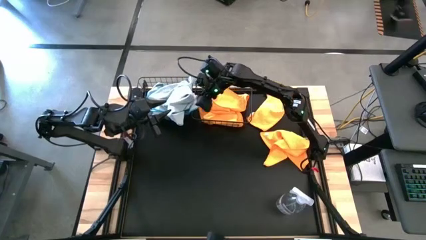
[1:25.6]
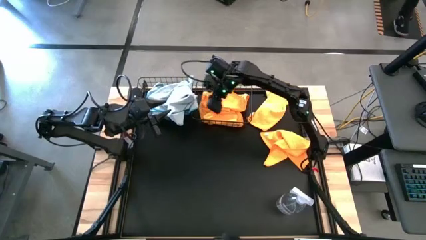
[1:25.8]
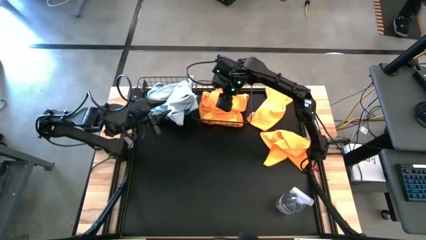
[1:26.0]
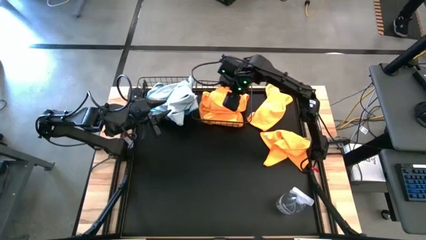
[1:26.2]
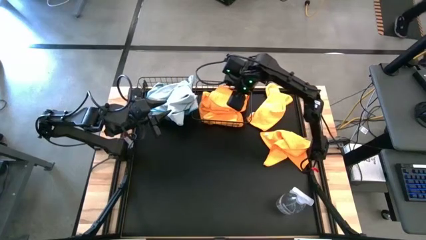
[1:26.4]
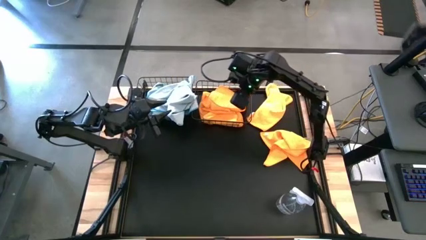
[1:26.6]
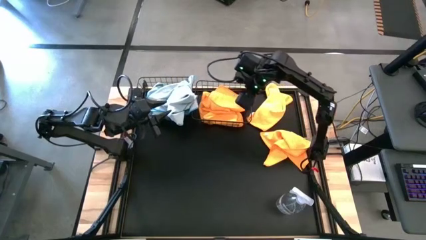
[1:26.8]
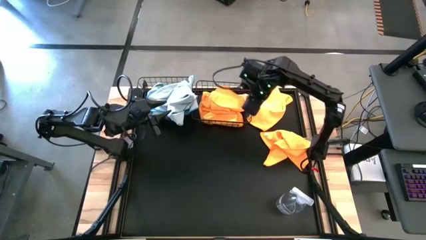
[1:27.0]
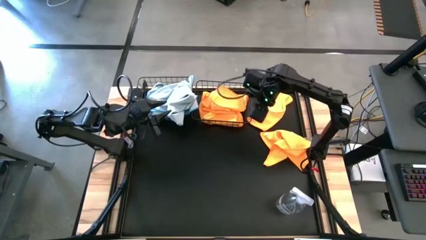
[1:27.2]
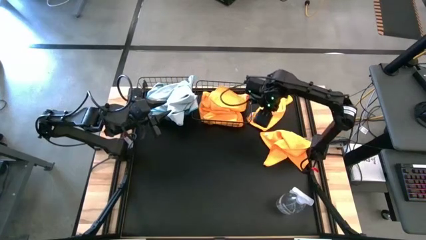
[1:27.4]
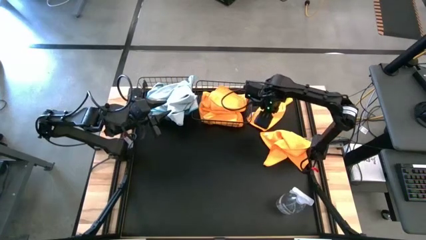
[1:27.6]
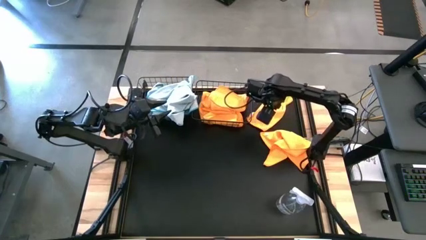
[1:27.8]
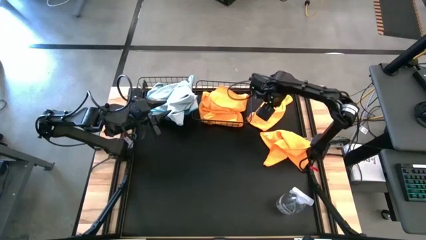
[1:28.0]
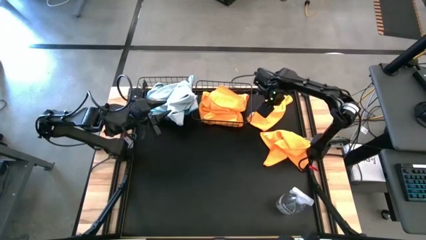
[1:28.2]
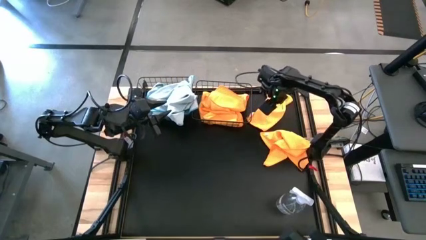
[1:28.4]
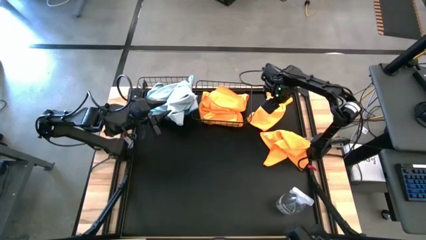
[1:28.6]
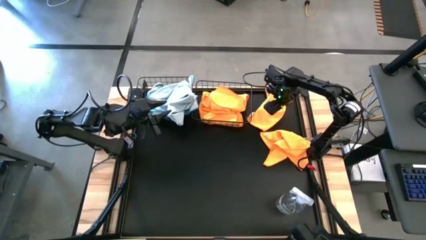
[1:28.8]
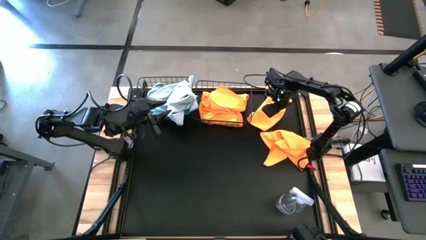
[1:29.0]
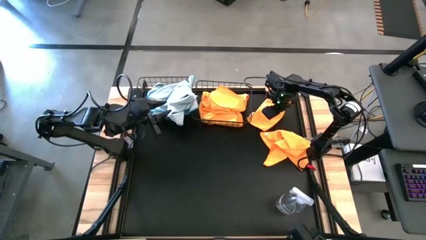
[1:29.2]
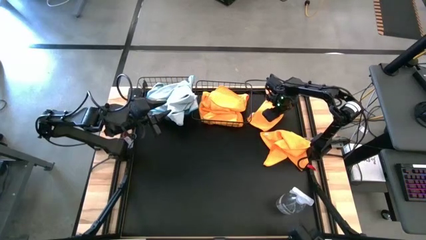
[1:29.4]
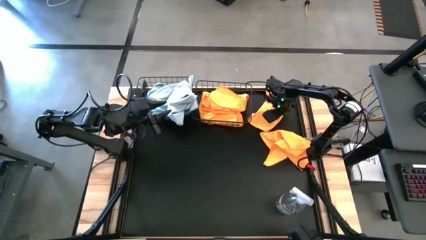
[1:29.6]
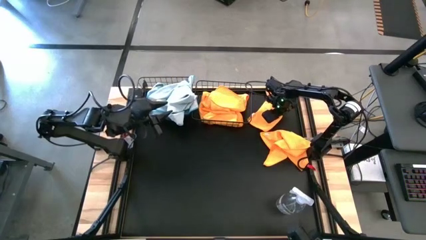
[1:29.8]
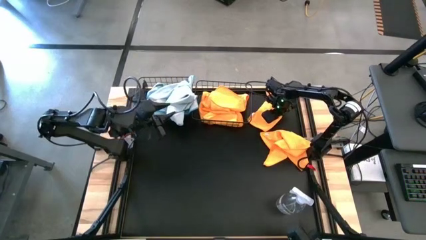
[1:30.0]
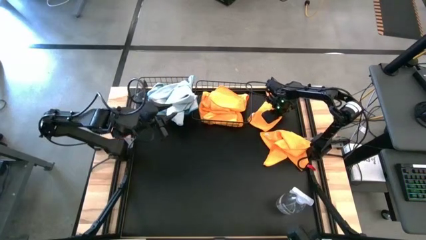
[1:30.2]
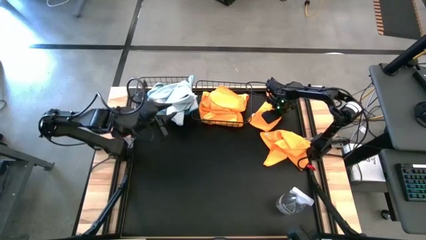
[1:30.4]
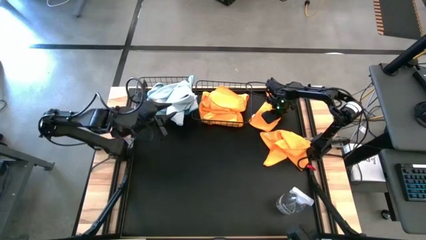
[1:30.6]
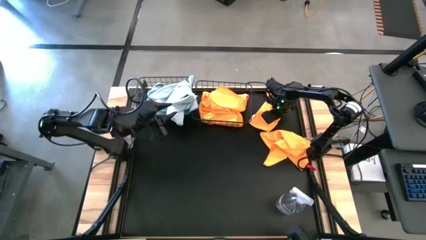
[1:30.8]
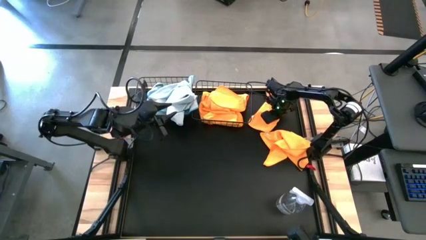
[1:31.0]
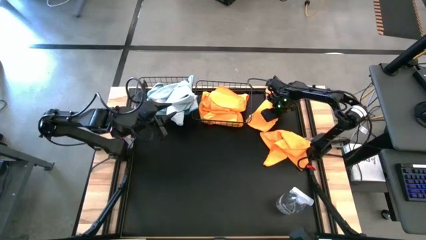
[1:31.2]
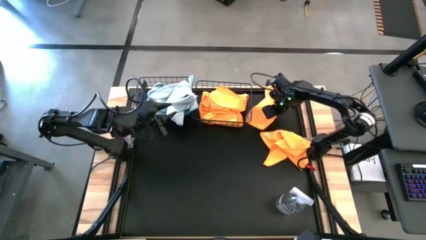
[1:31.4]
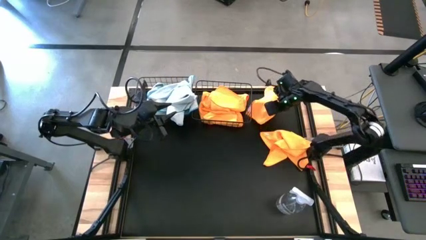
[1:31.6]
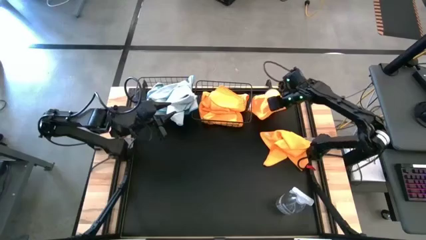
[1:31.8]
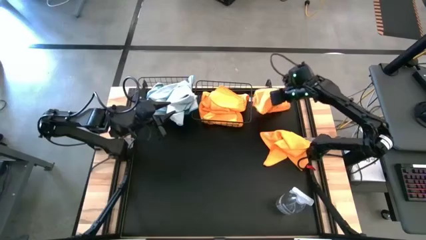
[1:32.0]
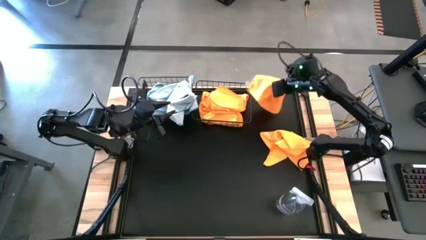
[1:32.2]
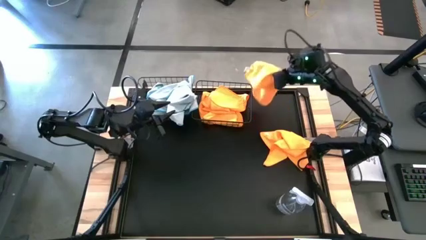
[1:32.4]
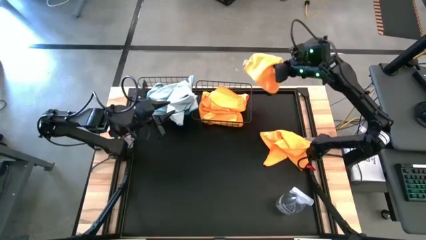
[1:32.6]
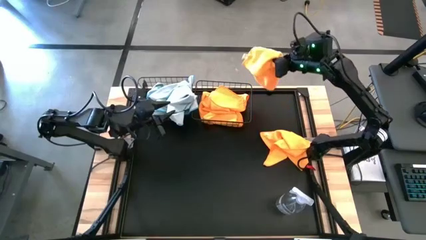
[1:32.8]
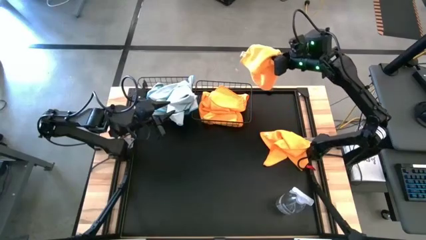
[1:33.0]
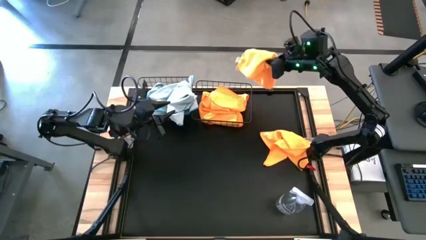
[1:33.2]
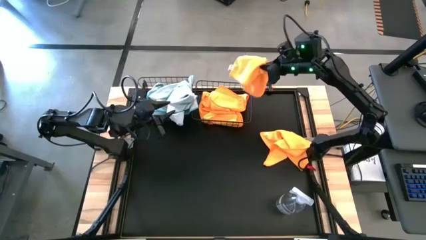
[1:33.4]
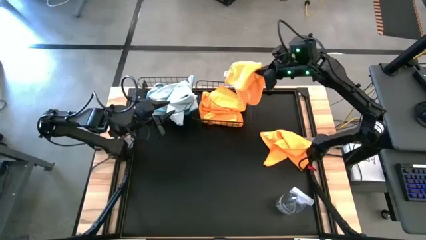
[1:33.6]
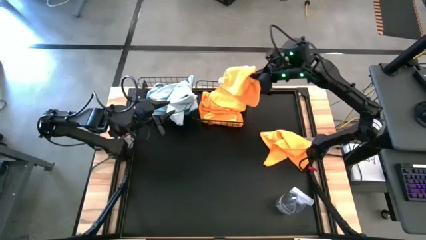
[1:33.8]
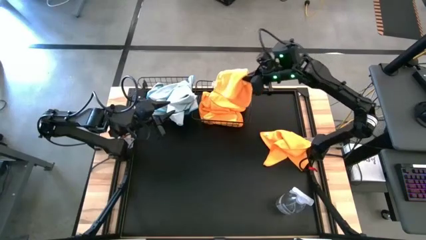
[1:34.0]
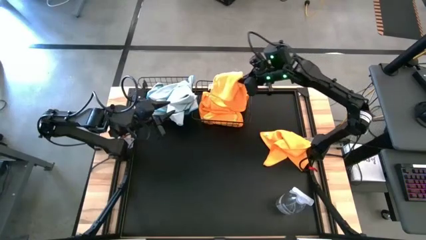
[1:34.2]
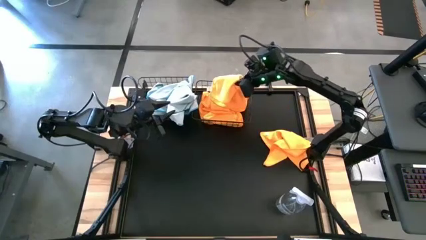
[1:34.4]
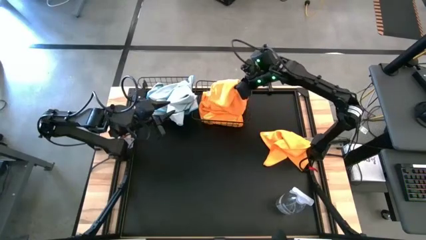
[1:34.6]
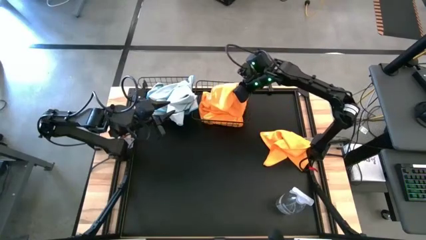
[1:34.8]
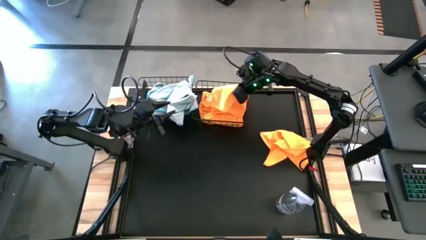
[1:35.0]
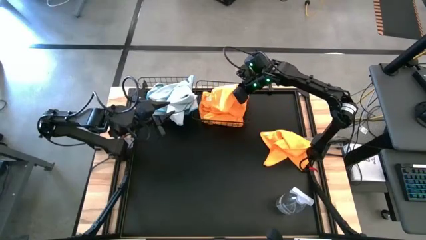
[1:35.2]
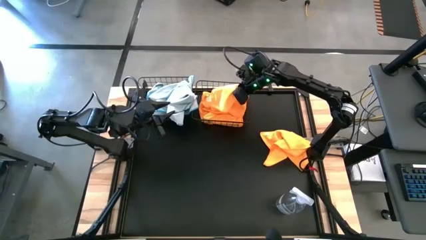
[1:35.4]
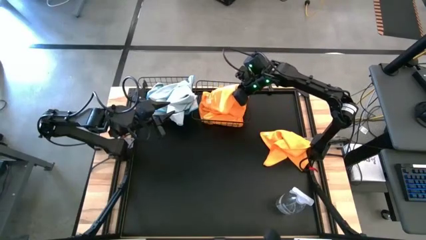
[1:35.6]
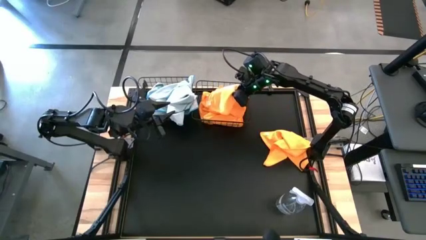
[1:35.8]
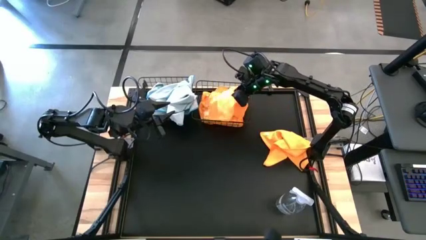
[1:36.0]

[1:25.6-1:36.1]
Task: Sort microfiber towel by color & place in baskets
Put the yellow towel into the right black wire basket

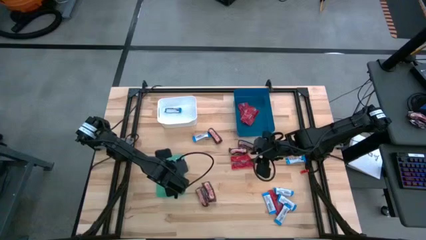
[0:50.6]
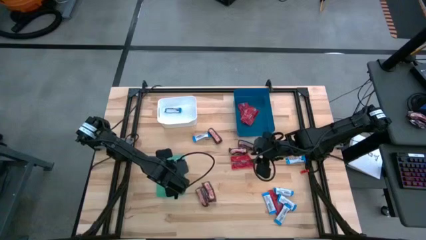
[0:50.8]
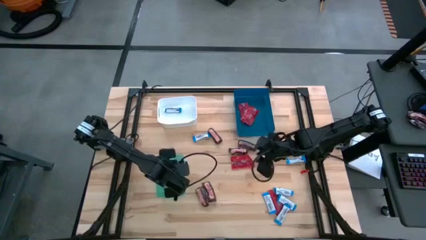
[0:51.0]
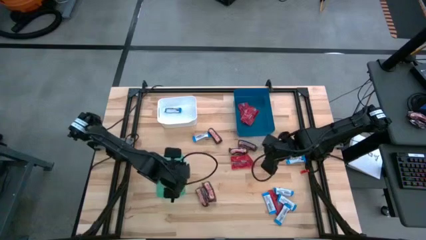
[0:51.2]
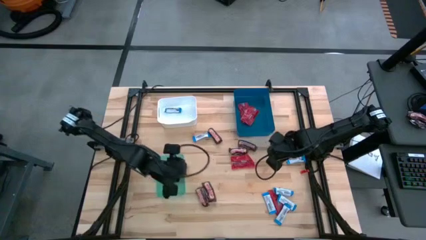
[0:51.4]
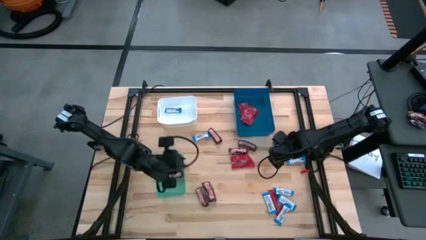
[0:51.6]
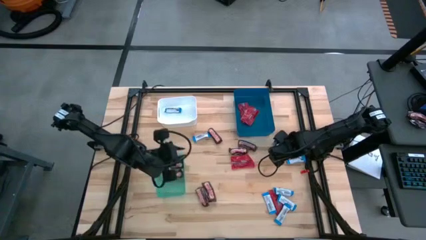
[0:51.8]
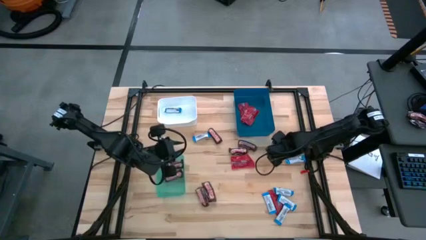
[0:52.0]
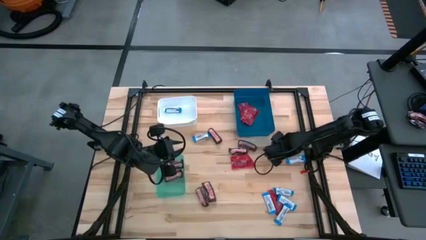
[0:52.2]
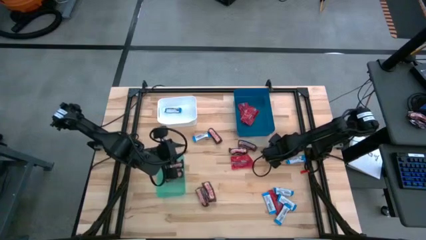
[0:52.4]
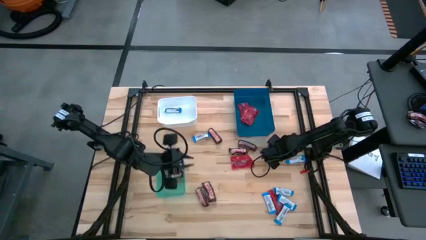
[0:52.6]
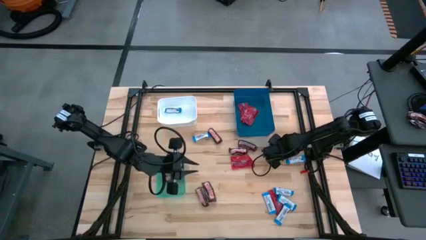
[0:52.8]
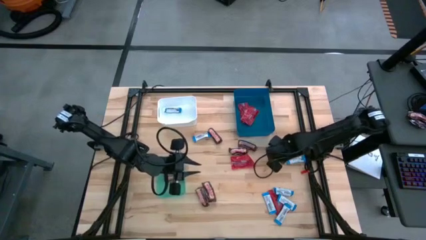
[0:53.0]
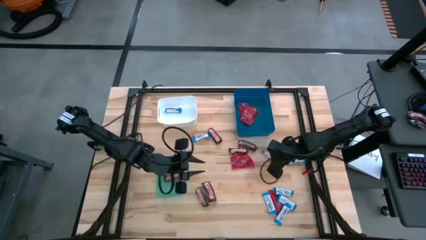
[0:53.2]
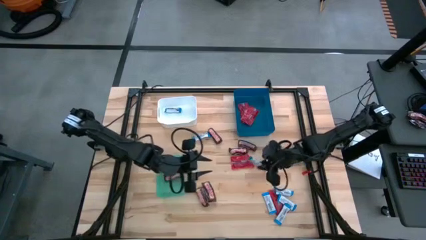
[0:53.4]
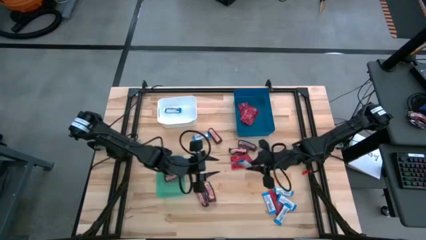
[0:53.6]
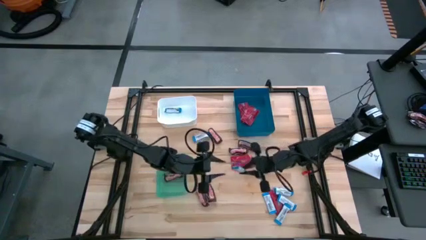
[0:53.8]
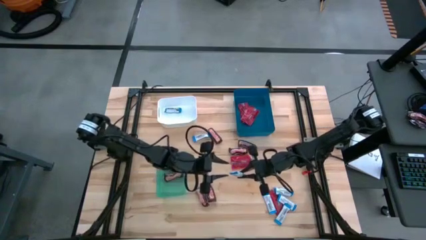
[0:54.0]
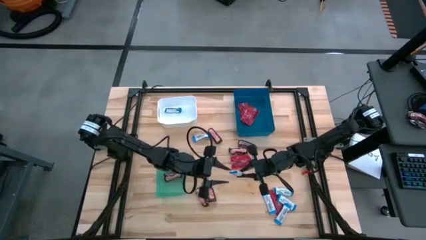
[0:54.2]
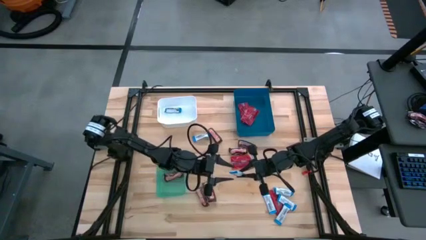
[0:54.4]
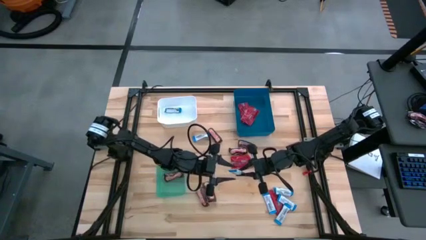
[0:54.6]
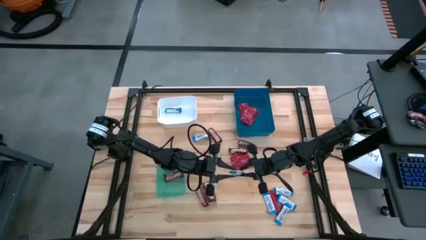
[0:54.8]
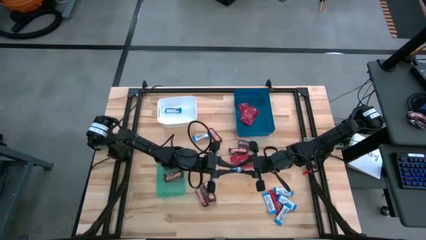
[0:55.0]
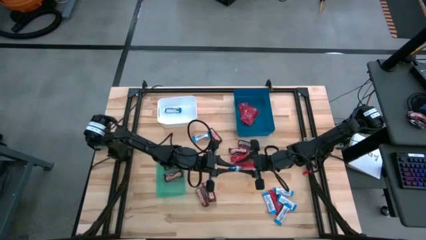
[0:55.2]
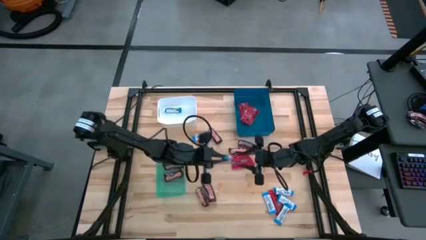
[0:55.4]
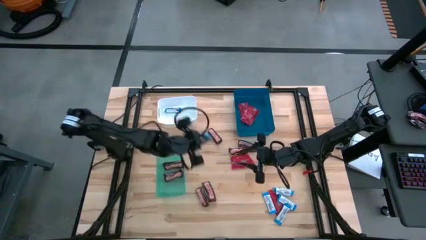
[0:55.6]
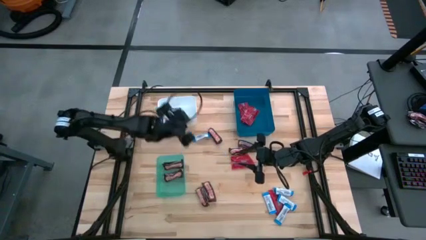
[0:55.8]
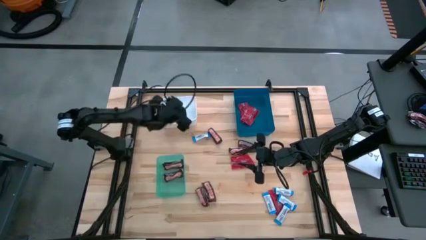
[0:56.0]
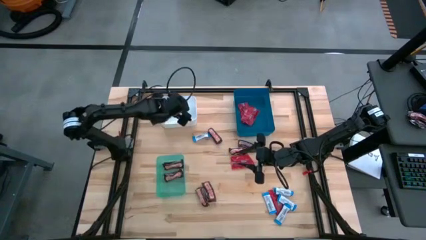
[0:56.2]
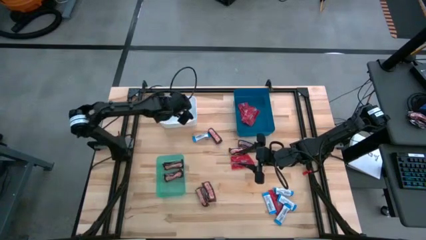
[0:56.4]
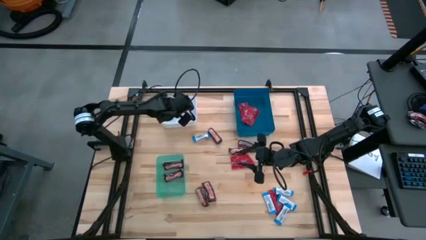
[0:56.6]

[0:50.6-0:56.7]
Task: Sort candy
Put the white chocolate bar into the white bin
